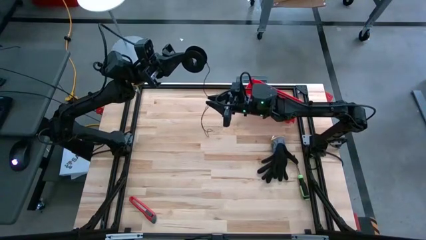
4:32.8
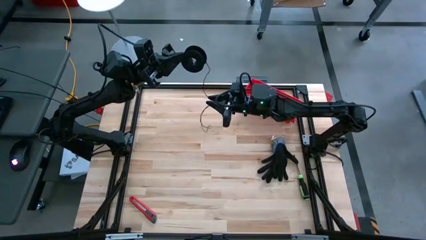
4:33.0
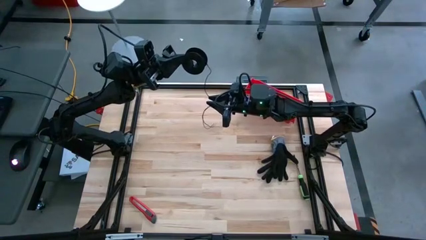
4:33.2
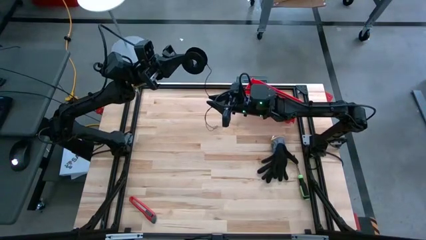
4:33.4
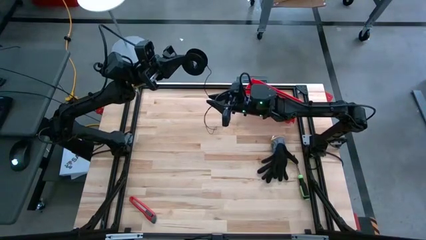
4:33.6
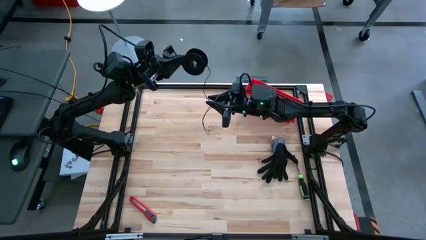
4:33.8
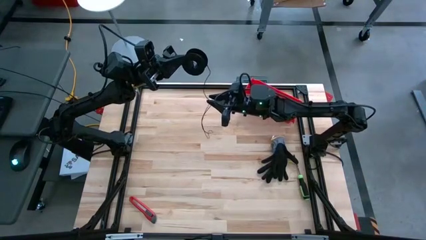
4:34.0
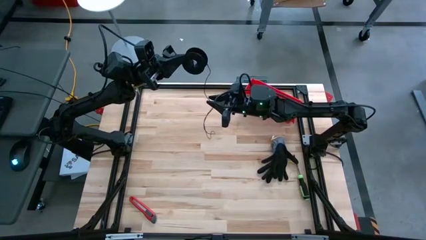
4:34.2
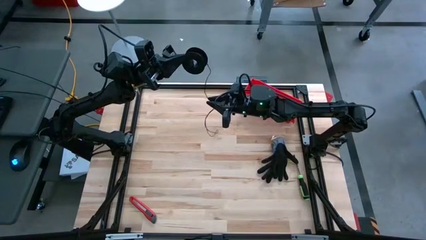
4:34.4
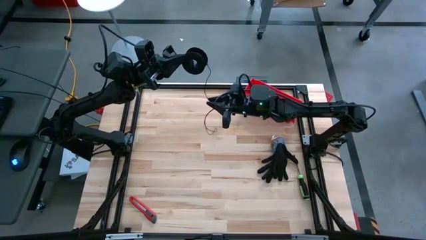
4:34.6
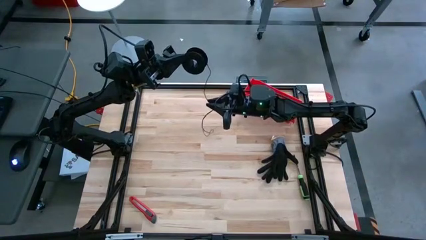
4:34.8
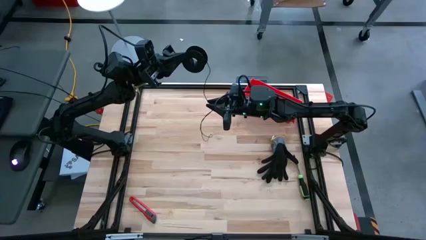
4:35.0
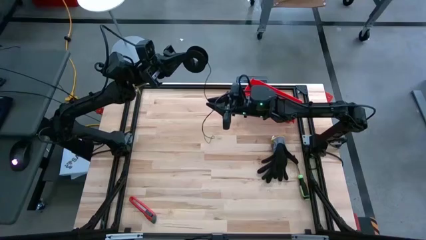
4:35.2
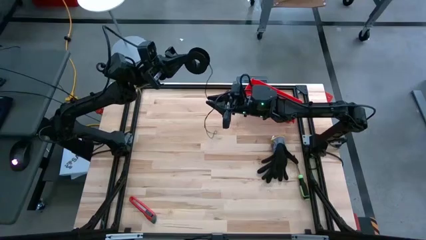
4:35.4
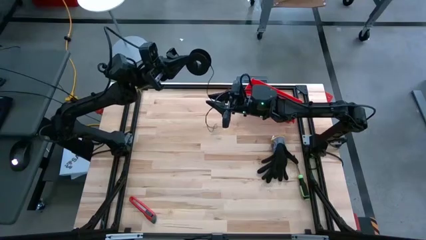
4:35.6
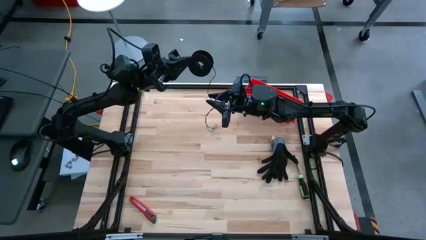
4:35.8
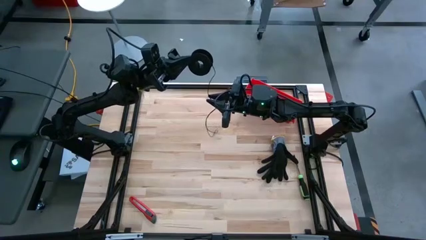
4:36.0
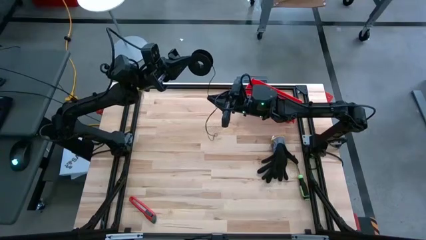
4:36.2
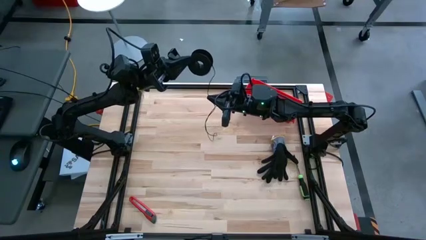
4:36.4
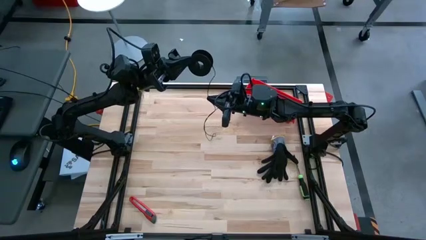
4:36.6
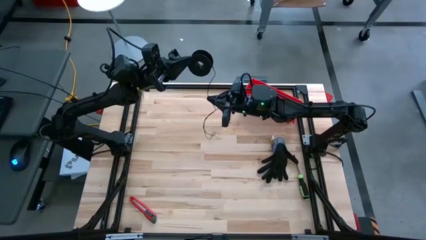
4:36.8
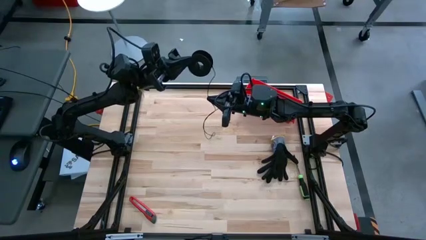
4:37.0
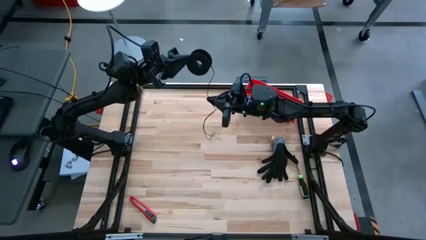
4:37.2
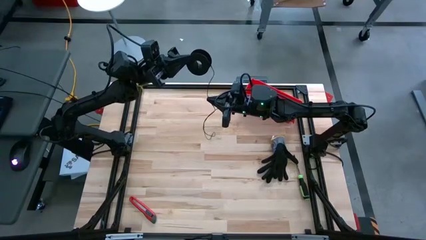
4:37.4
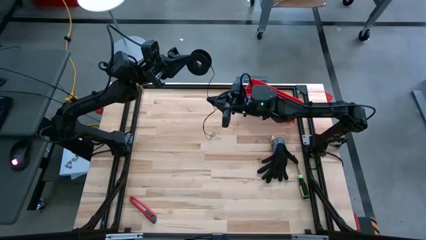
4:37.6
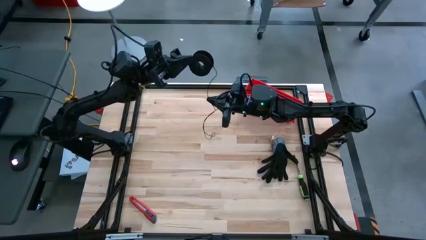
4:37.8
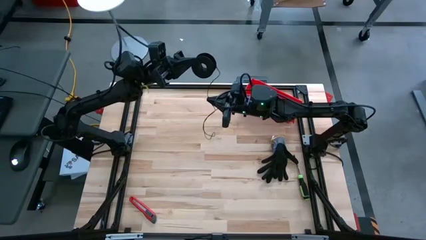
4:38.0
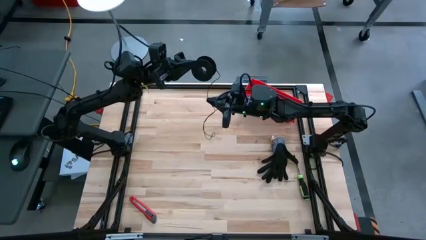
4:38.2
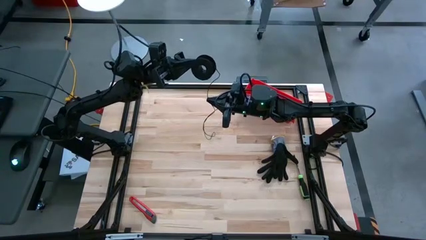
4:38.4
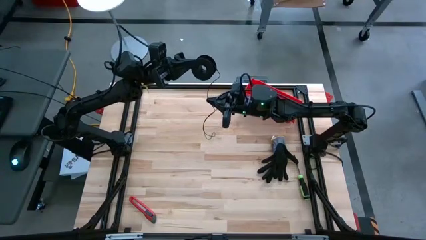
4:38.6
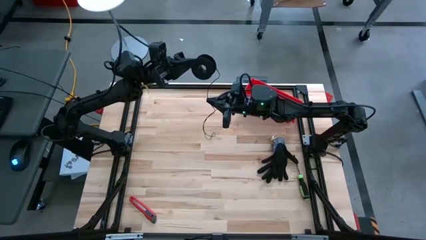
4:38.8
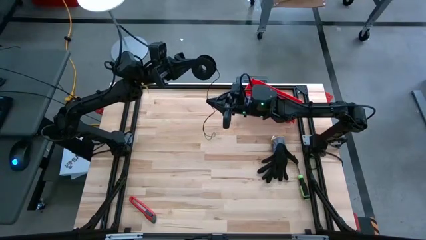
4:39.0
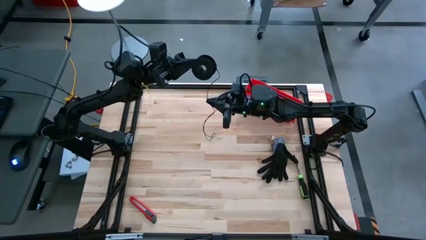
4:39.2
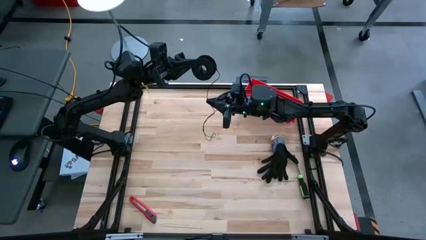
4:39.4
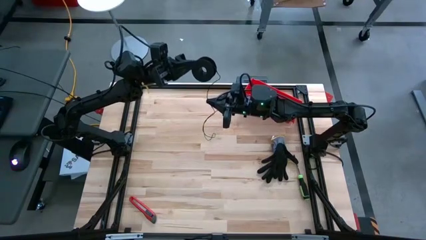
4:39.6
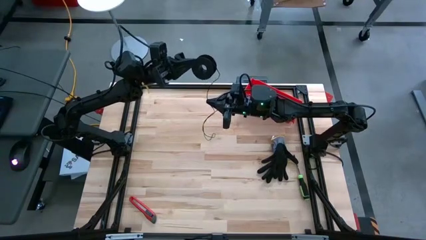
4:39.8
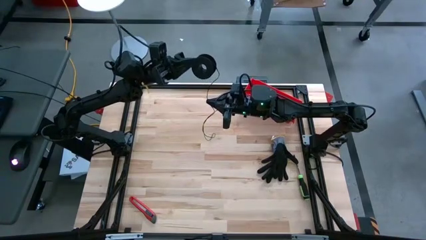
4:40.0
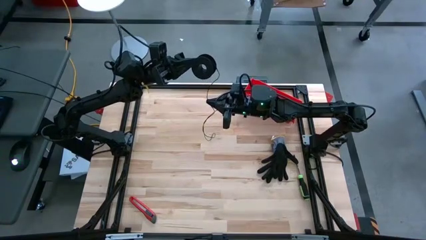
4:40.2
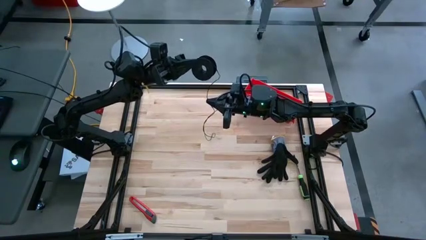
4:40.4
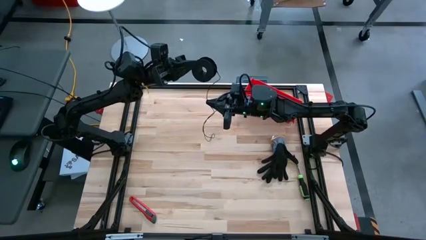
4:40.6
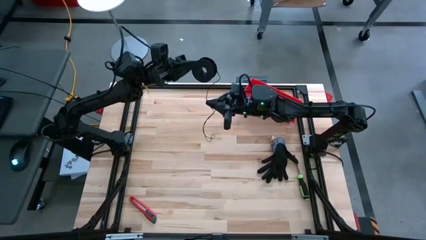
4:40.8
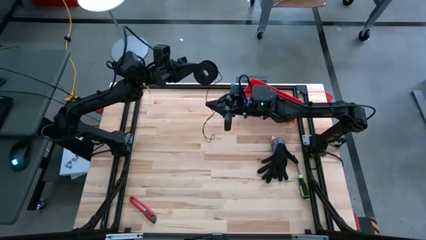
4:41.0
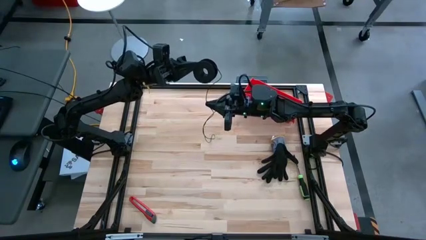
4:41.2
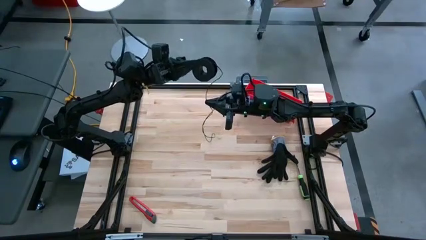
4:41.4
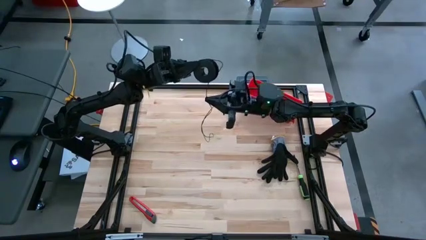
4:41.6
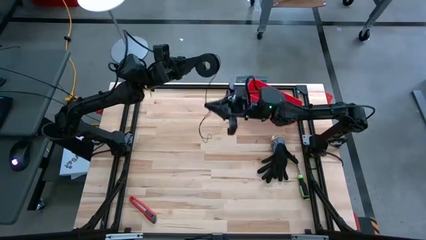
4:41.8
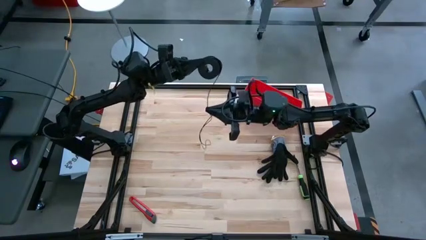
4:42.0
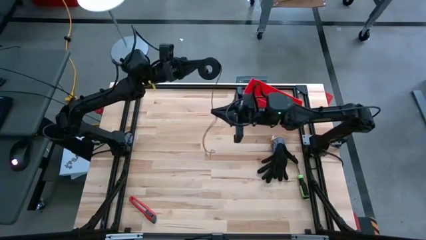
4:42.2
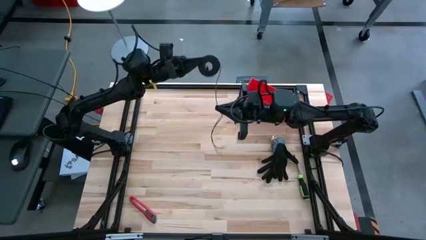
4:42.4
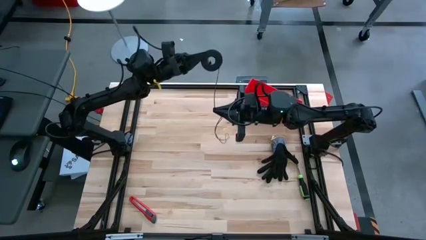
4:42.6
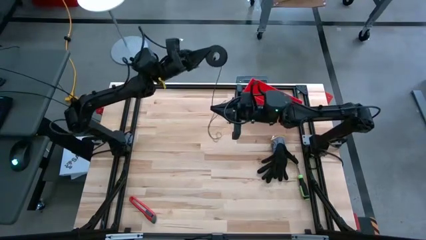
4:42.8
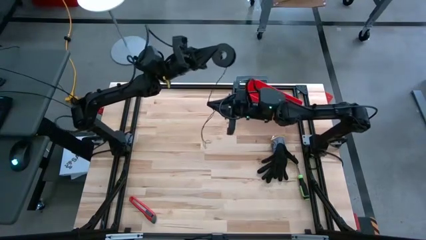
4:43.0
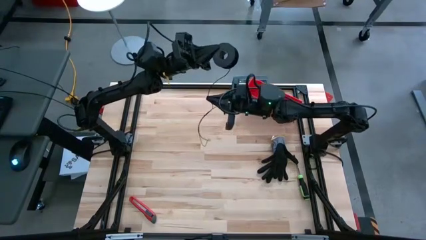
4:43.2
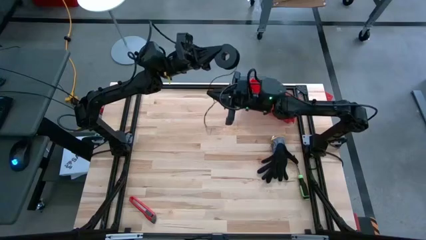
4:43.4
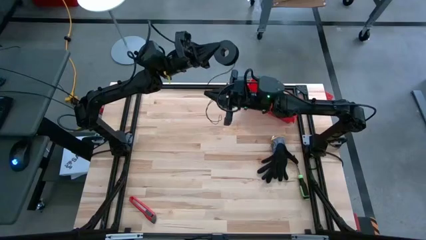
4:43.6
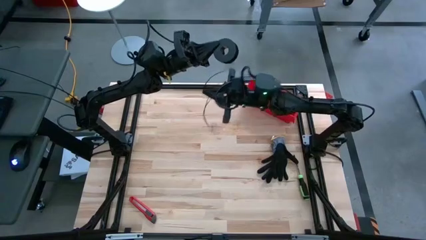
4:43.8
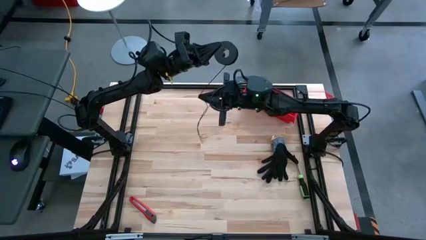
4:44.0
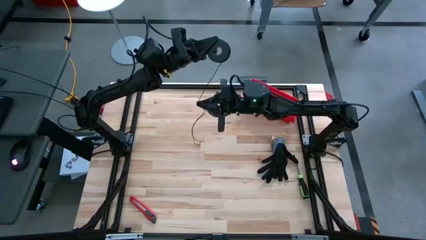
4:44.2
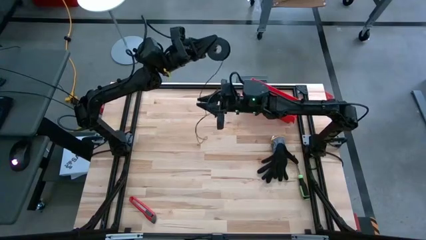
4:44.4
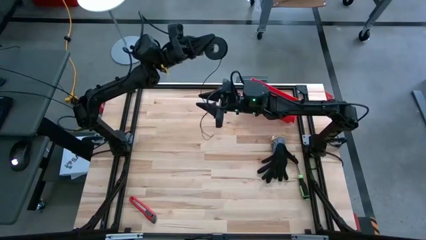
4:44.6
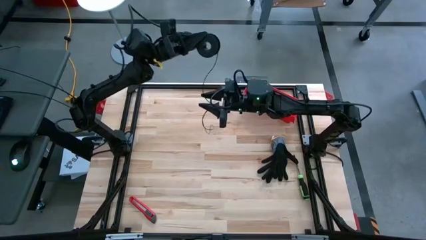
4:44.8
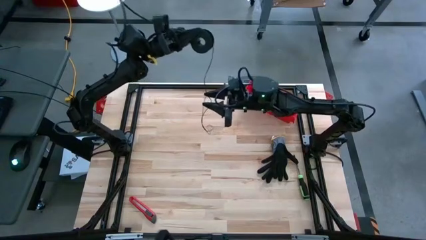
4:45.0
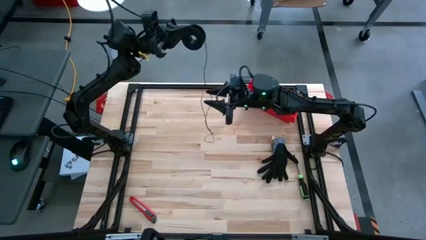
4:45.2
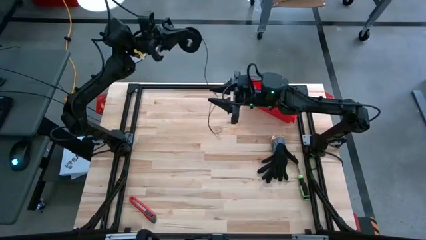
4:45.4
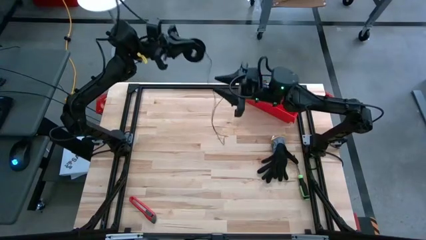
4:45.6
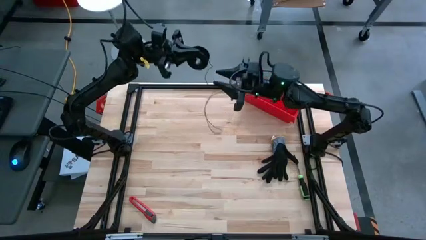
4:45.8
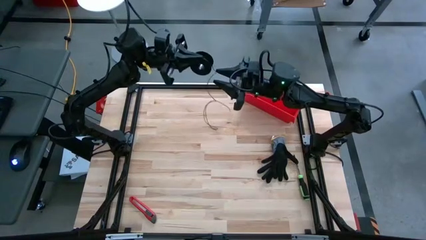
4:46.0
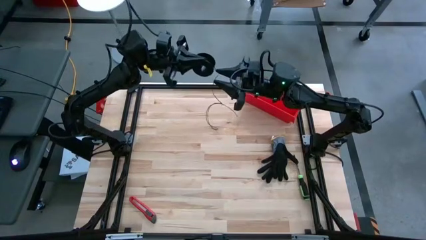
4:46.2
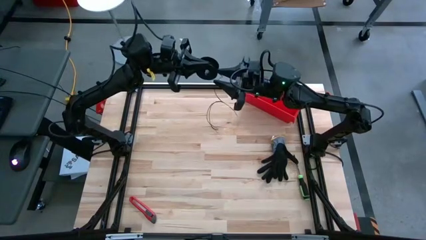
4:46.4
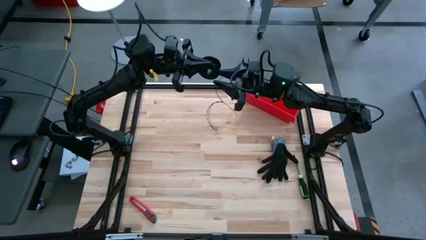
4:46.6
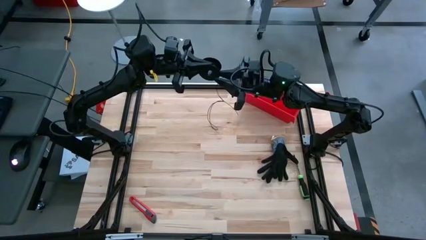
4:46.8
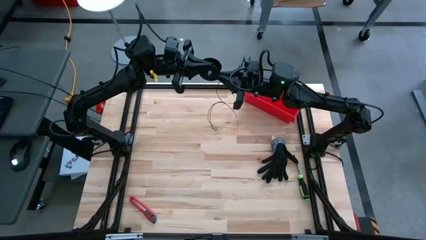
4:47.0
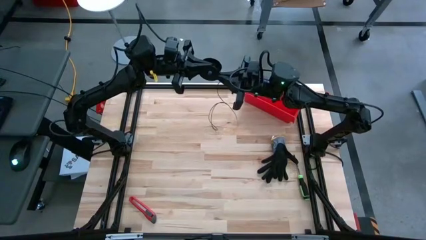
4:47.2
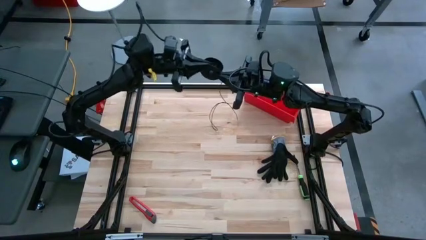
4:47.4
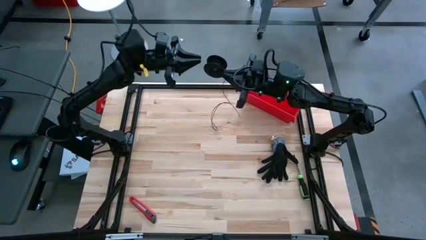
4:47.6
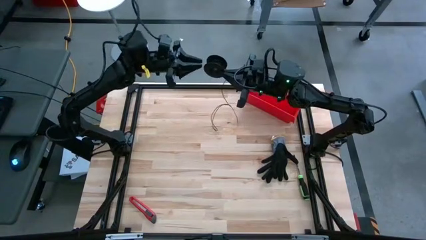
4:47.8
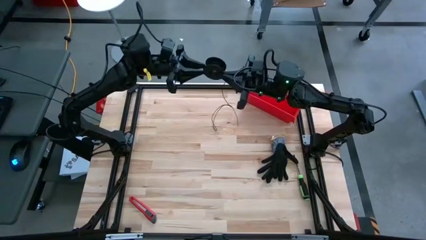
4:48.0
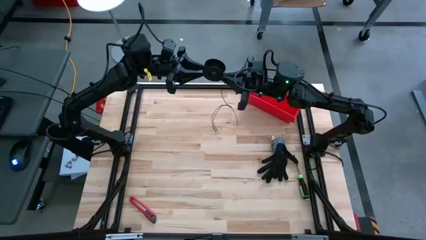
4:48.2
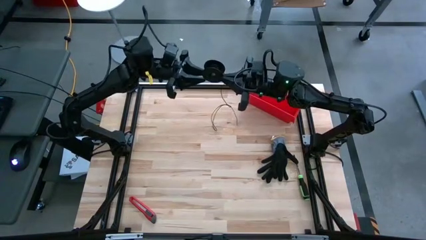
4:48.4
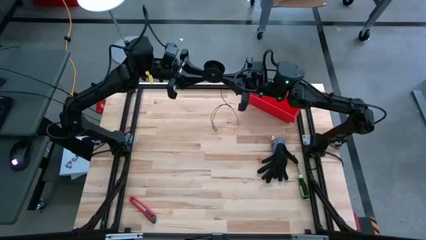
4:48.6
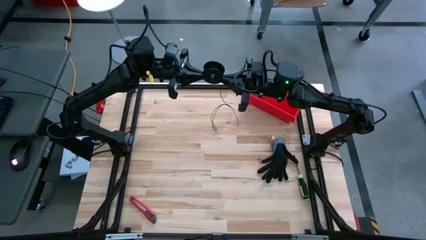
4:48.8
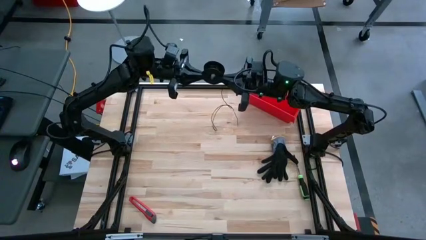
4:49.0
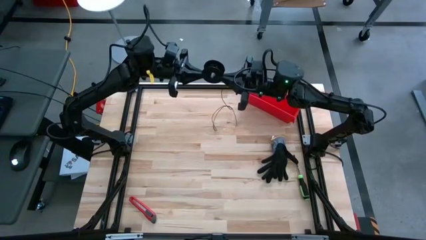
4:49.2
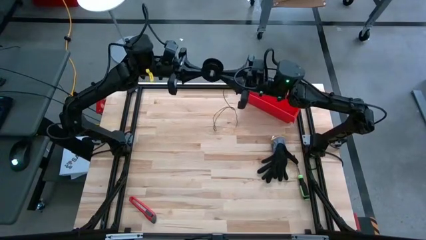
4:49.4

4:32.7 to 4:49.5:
Task: Coil cords
Coil the black wire on the spool
